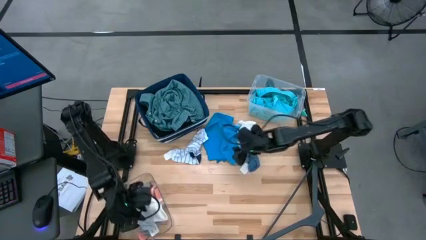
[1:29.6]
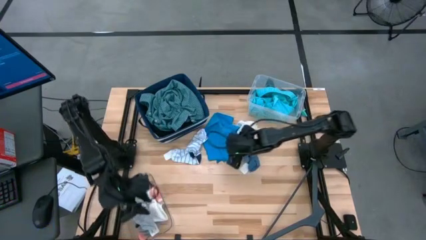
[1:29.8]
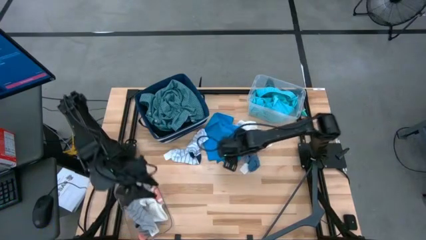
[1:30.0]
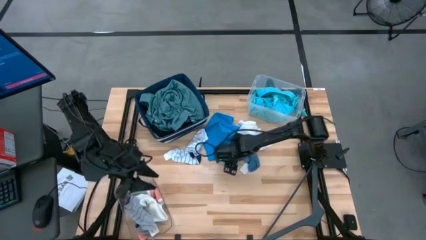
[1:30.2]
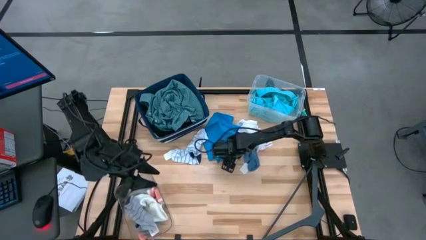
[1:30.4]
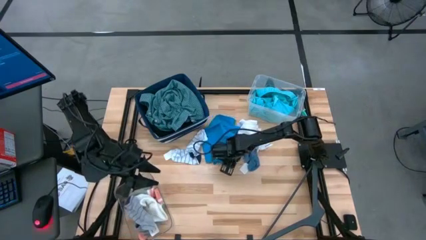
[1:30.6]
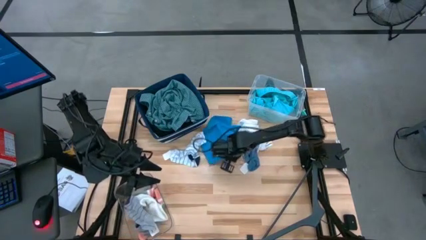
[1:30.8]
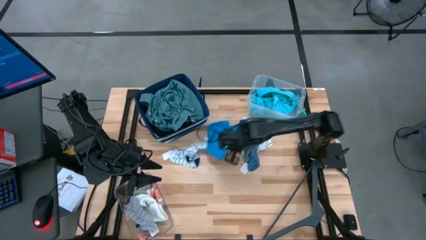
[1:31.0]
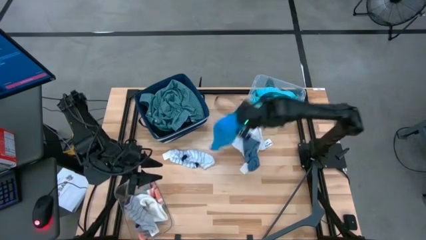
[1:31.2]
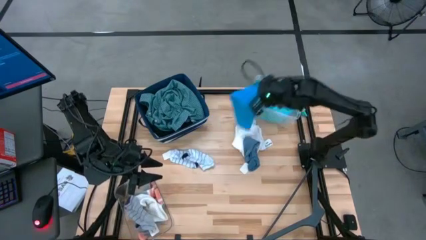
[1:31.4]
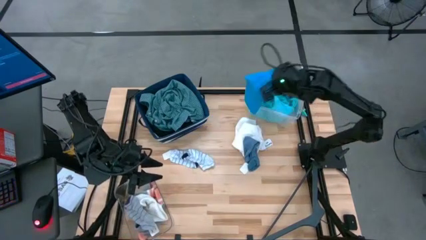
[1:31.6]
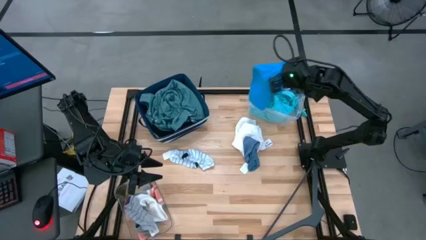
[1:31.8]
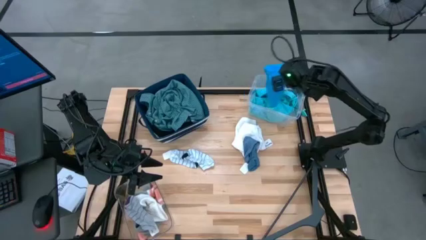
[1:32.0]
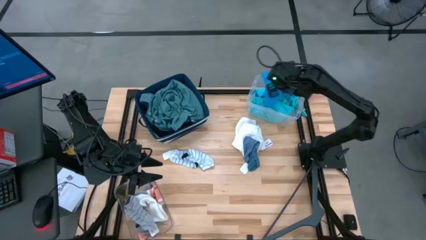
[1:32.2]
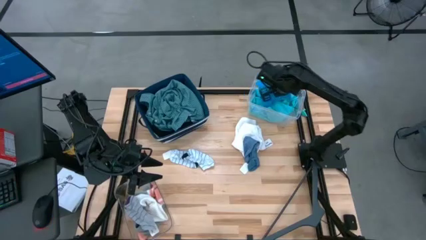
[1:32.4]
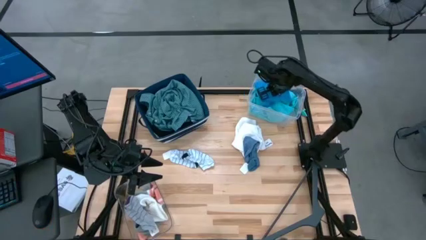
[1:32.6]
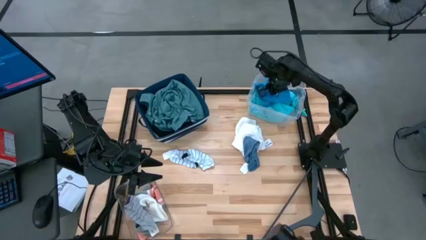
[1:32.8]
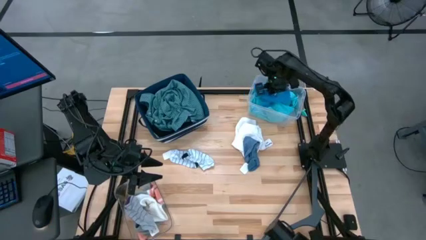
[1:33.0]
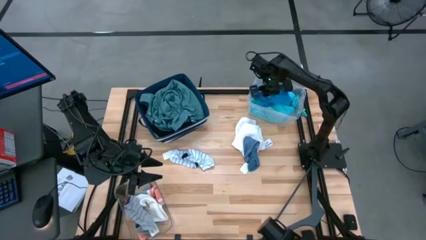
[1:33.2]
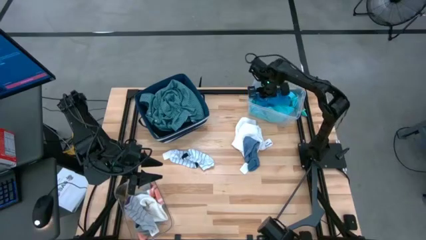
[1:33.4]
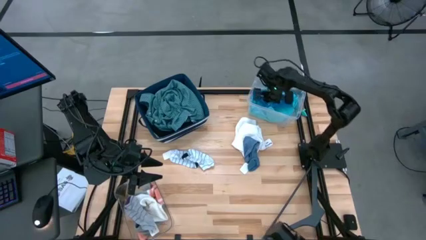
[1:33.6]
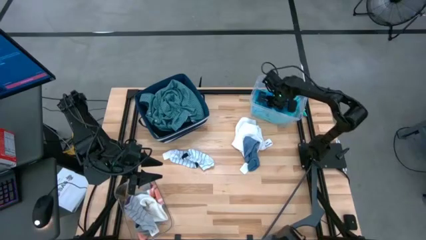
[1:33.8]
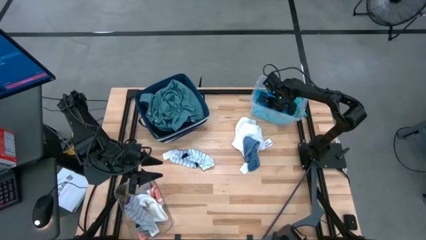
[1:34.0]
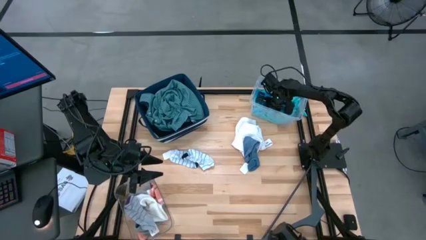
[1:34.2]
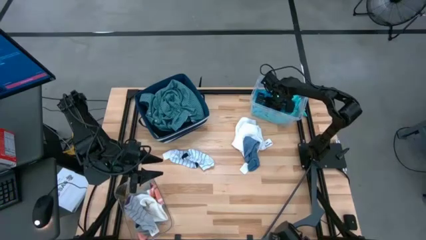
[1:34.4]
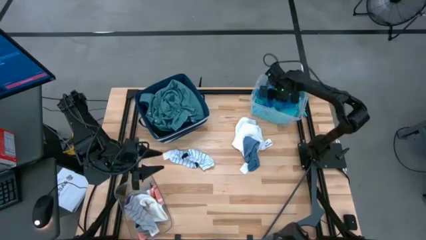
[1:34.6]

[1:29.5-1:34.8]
Task: Pick & Place Cloths
Put the blue shorts into the white bin

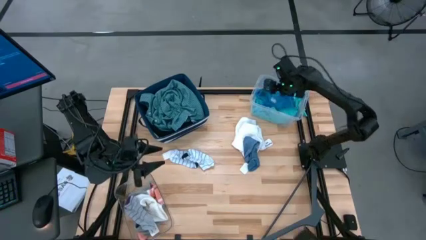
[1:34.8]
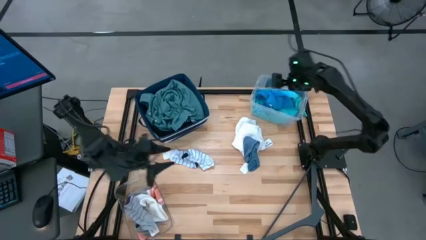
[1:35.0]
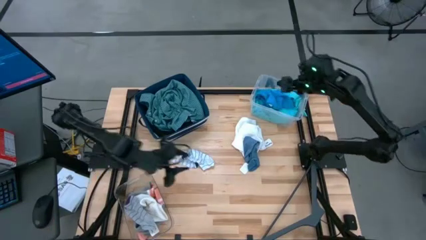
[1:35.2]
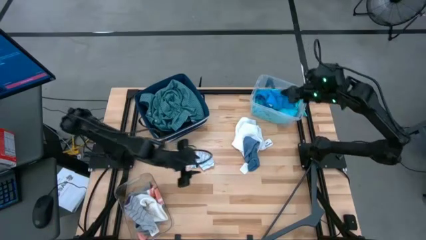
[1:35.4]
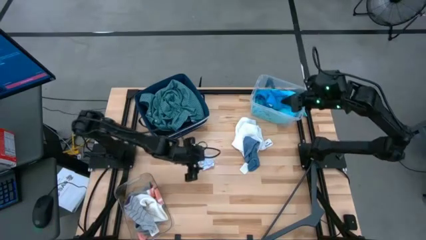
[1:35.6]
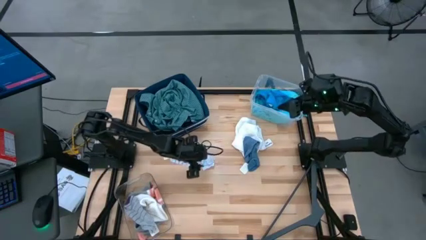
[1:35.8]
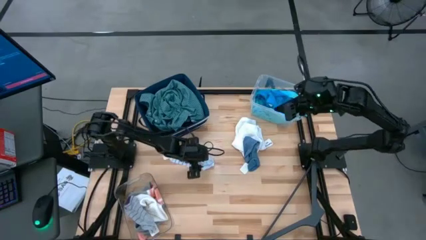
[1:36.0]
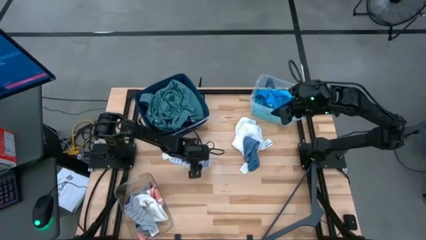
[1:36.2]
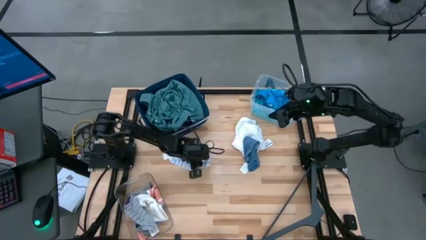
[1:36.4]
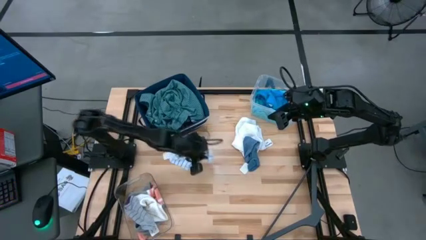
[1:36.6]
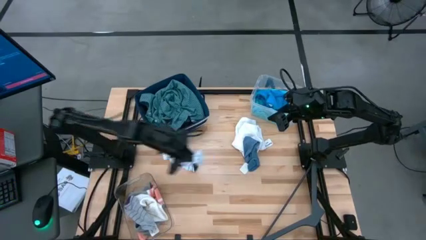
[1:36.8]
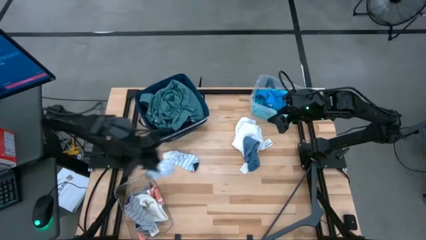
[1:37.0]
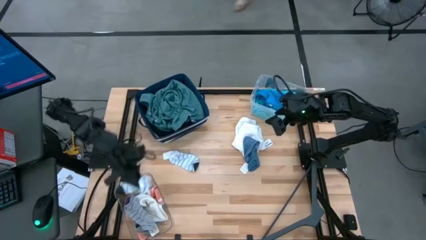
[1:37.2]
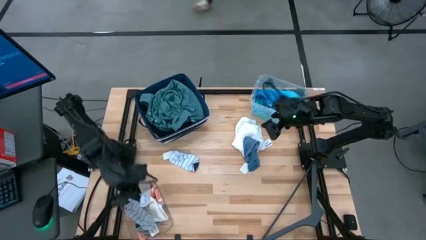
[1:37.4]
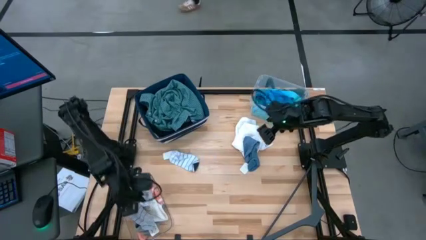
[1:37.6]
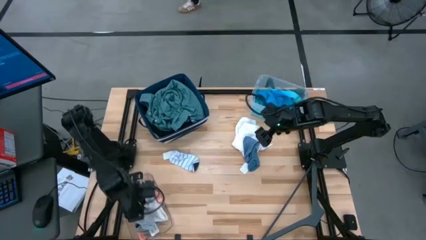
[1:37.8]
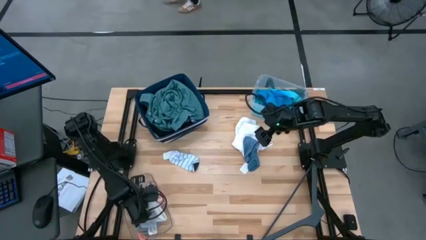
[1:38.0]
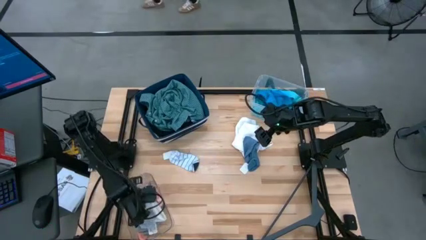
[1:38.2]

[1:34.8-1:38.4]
Put the right white striped sock into the transparent bin

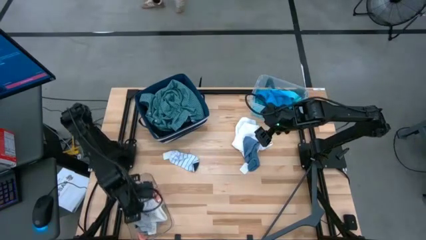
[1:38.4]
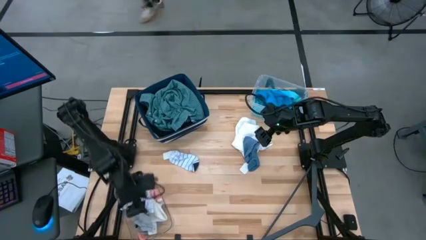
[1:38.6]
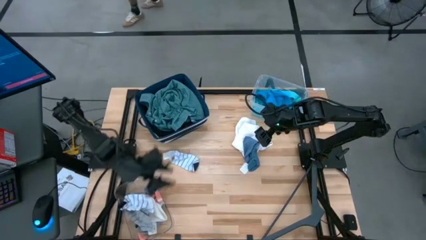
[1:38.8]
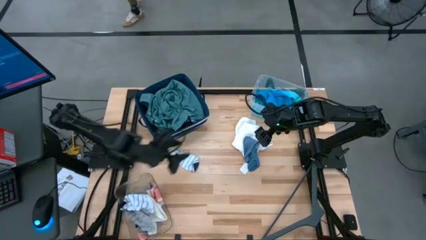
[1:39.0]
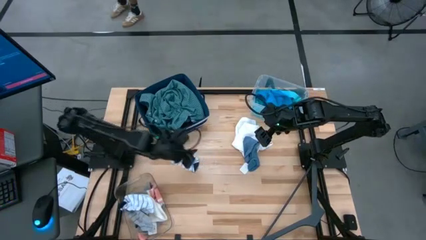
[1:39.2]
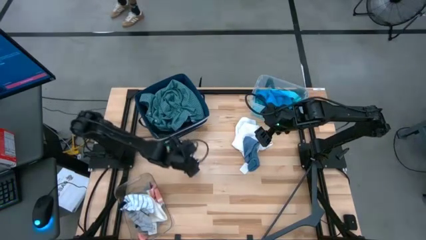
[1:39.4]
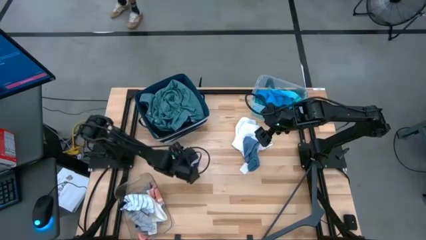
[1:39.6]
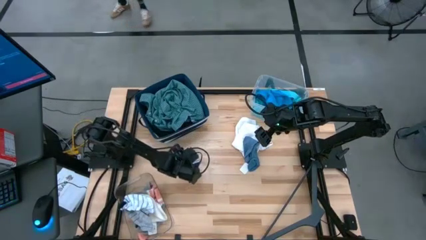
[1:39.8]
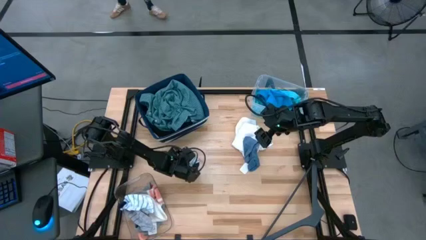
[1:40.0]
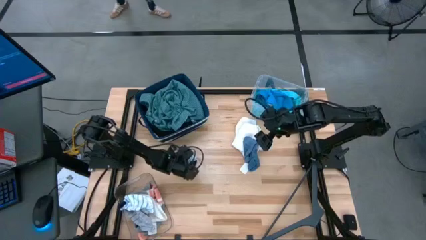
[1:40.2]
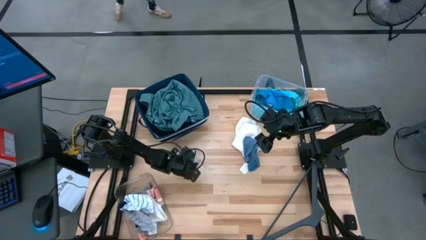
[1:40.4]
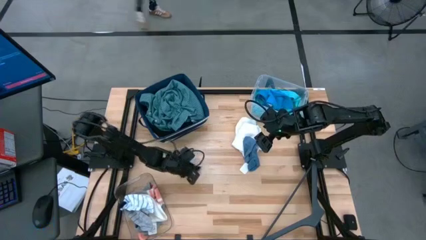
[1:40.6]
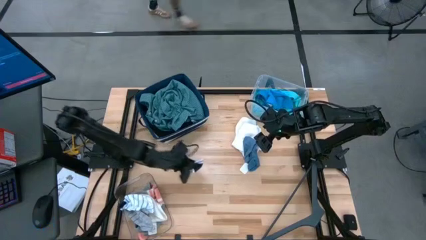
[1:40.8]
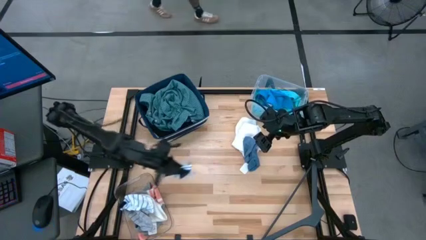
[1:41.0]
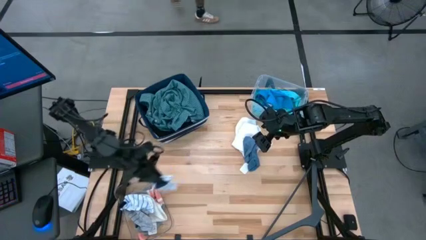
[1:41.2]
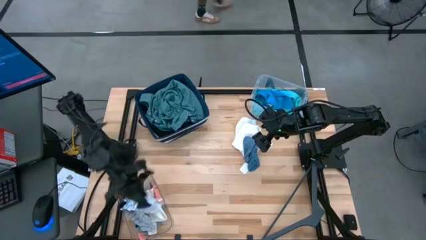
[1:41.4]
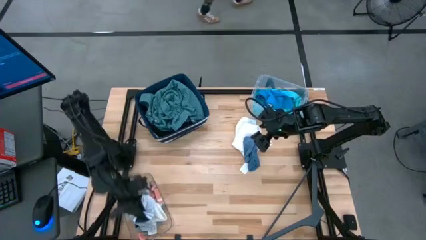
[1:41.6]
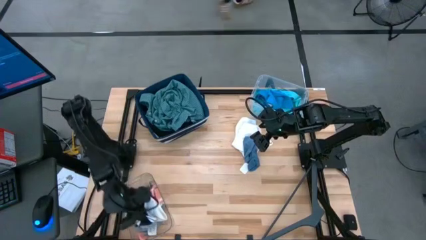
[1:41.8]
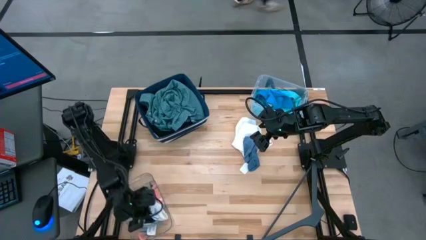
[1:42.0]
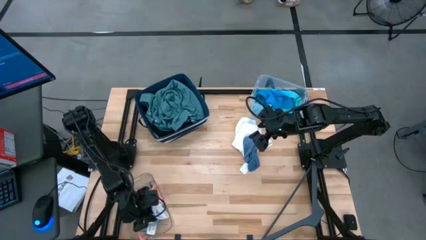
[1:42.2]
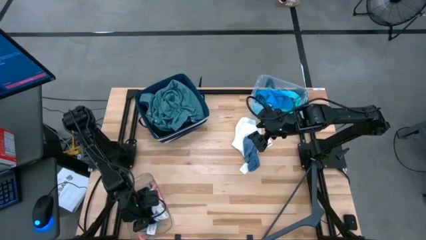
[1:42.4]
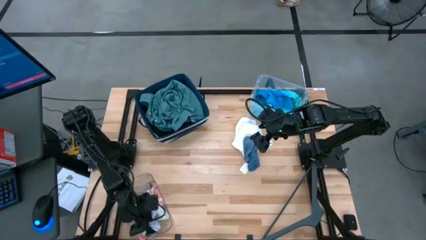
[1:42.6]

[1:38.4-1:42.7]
Put the white striped sock into the transparent bin

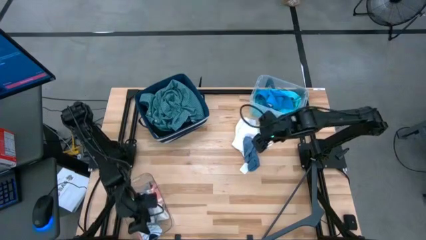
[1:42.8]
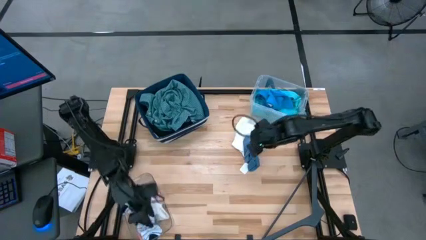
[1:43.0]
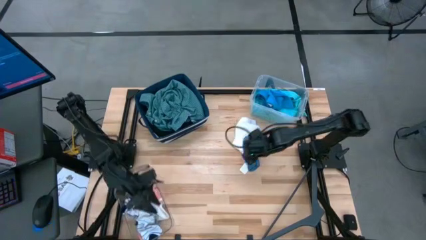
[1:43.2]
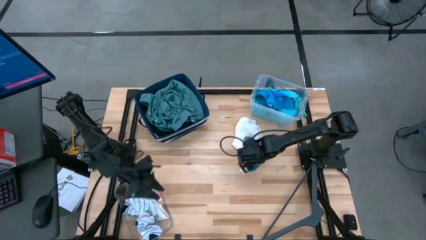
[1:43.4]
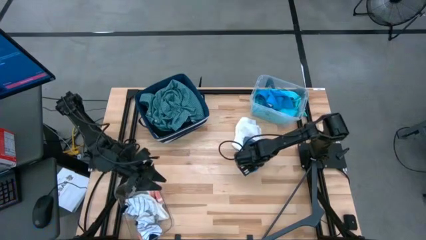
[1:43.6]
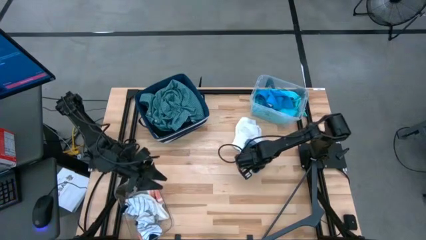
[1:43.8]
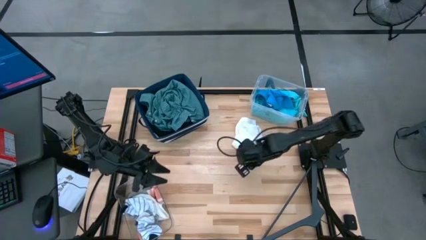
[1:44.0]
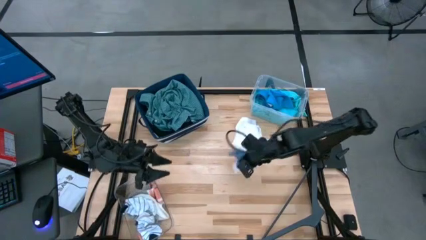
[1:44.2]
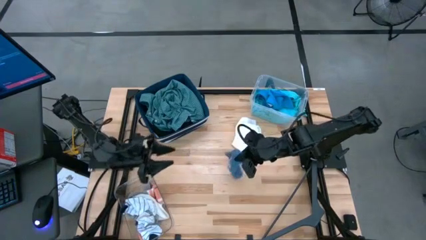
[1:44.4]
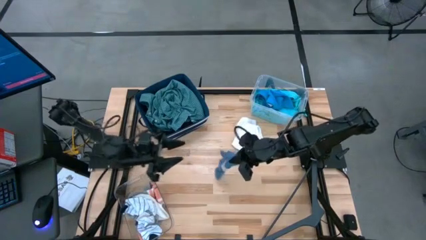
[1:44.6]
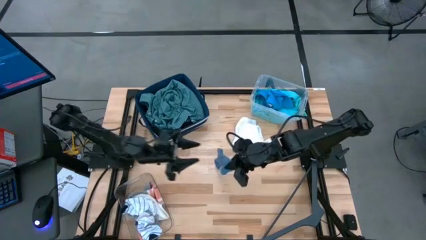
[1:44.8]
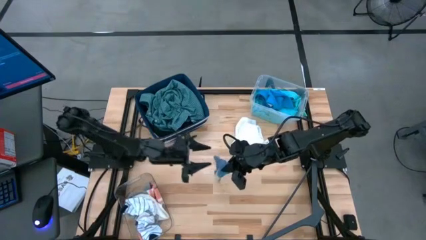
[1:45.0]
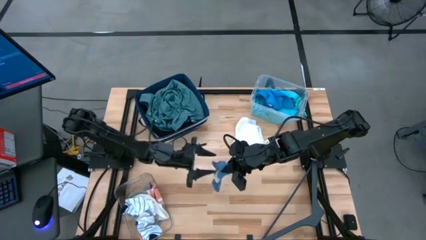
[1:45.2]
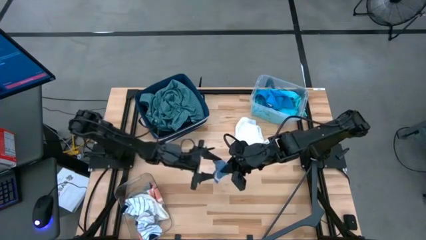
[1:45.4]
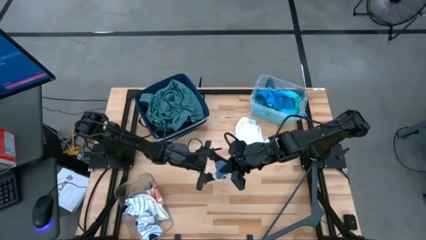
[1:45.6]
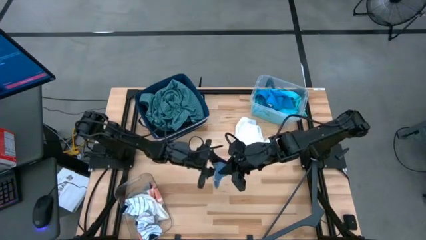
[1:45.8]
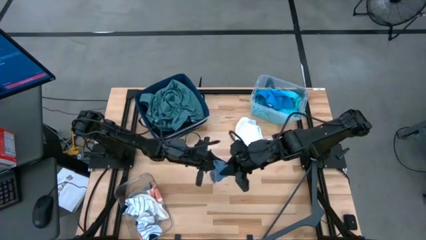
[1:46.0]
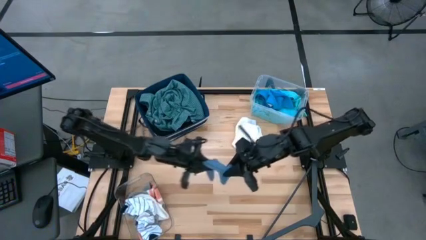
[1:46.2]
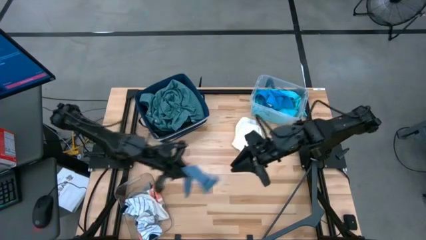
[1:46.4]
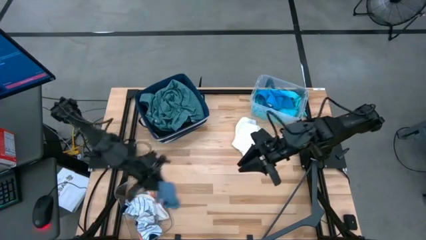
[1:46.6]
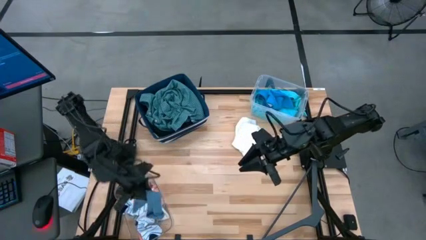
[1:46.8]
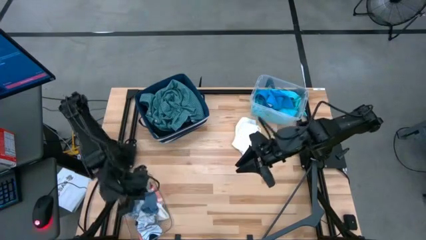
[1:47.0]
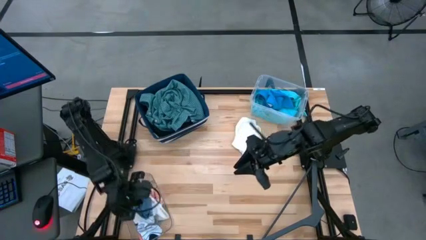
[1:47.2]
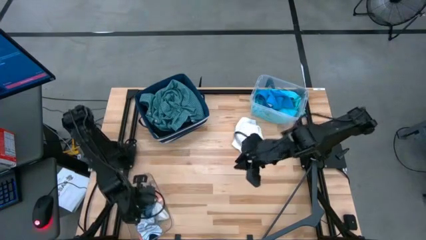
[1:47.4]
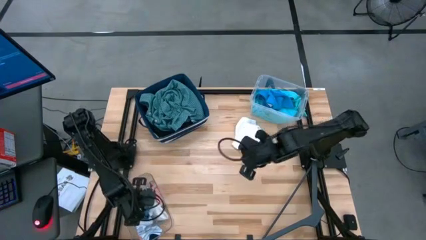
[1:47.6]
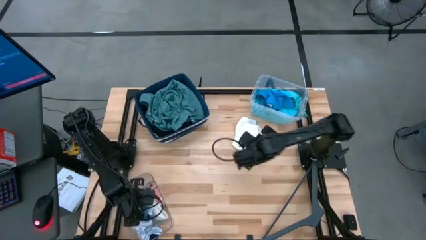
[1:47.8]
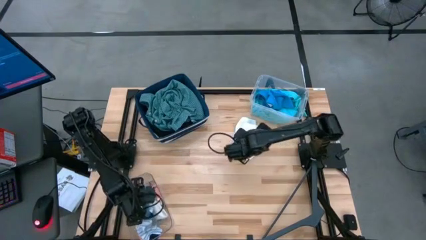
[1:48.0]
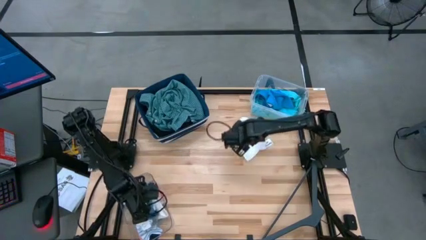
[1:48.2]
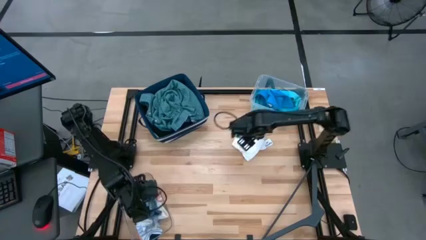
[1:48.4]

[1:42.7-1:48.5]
Put the blue sock into the transparent bin
